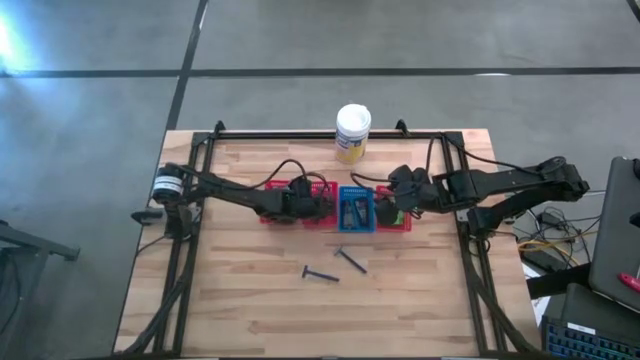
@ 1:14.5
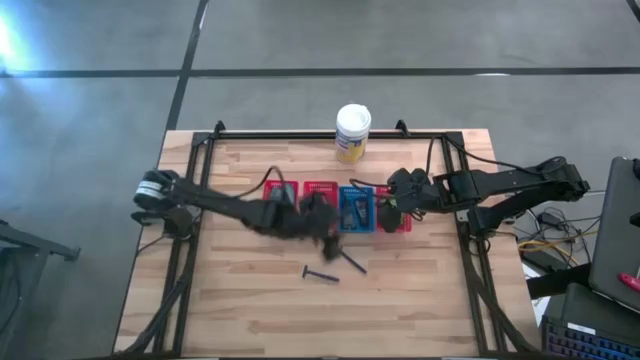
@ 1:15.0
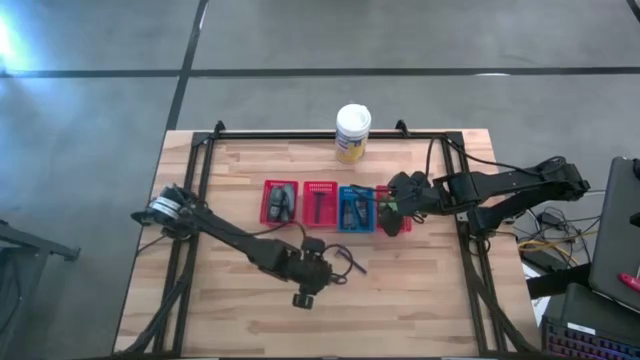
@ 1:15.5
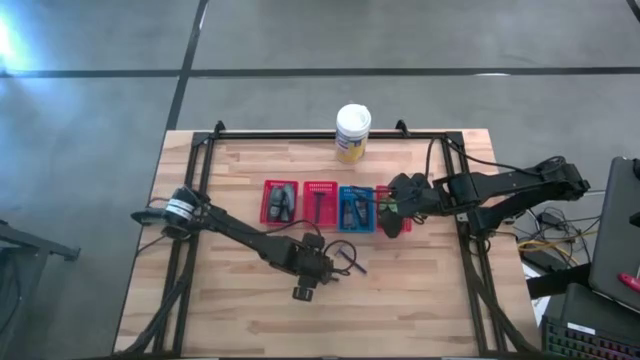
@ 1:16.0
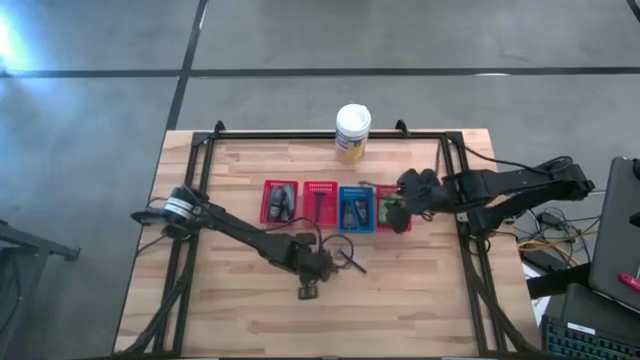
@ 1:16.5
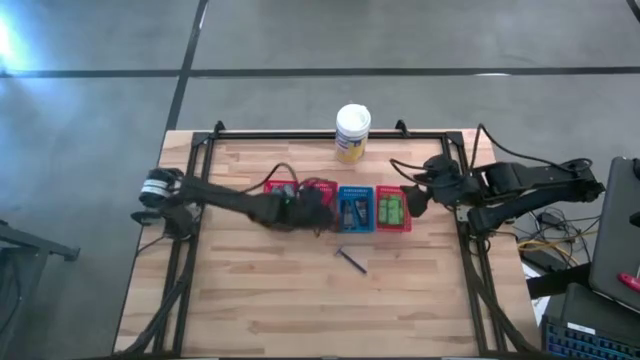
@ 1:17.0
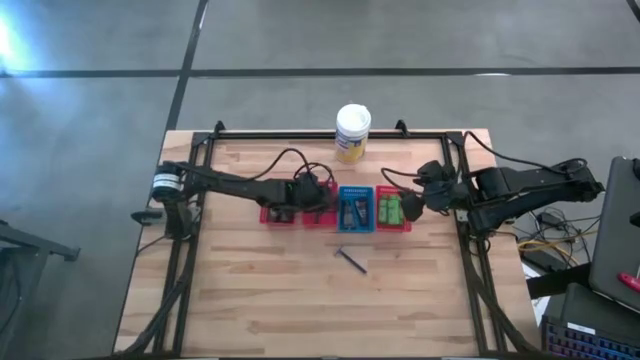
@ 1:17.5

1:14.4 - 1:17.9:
Task: Pick & Place Travel size toiletries
Put the blue razor into the middle left red bin

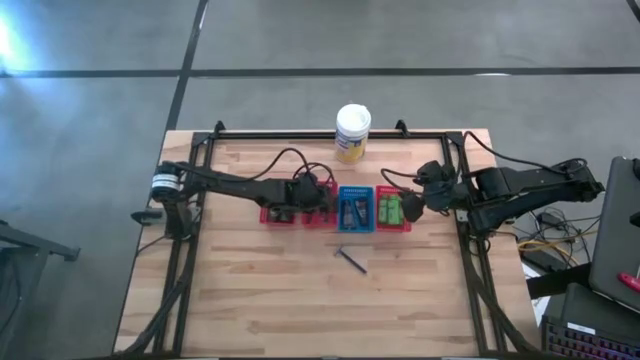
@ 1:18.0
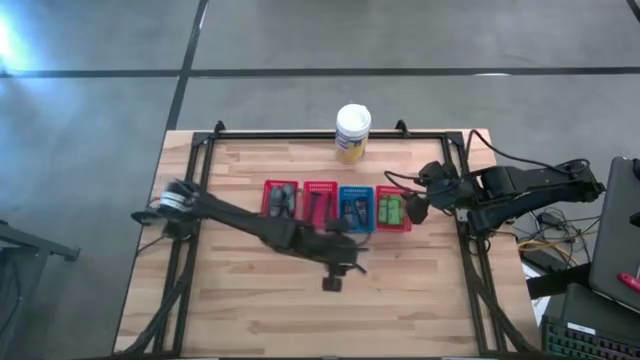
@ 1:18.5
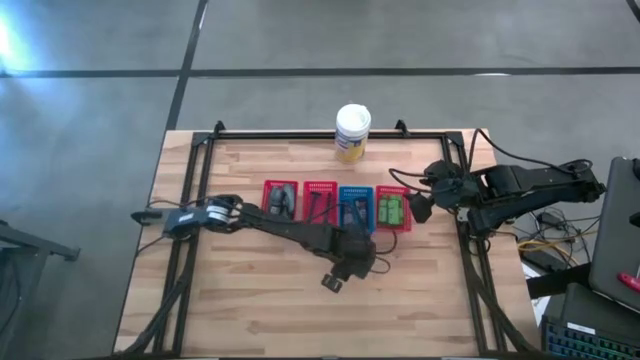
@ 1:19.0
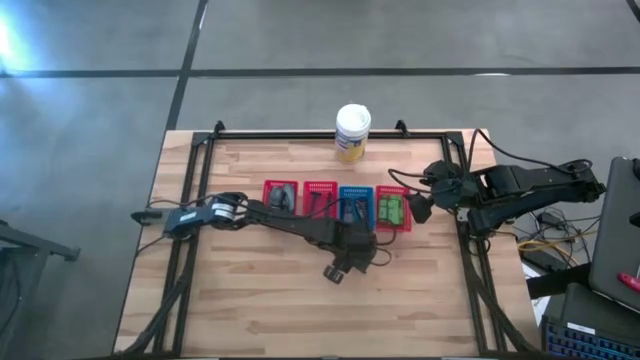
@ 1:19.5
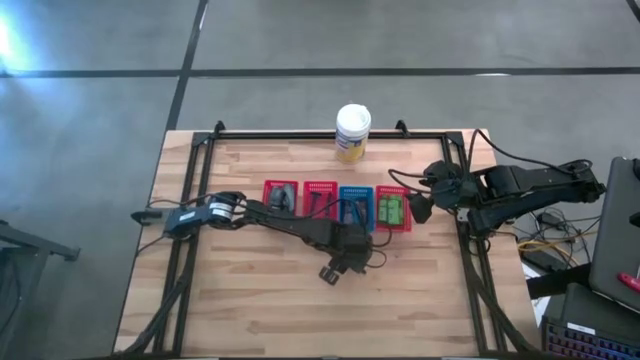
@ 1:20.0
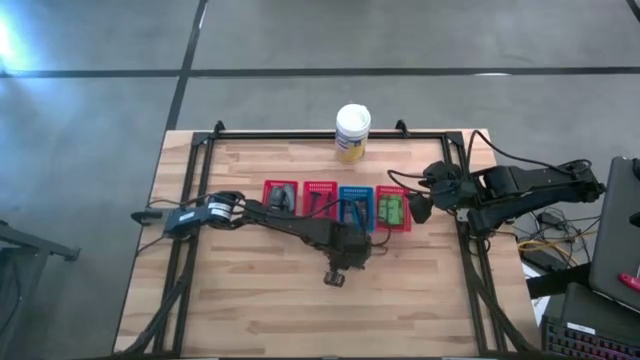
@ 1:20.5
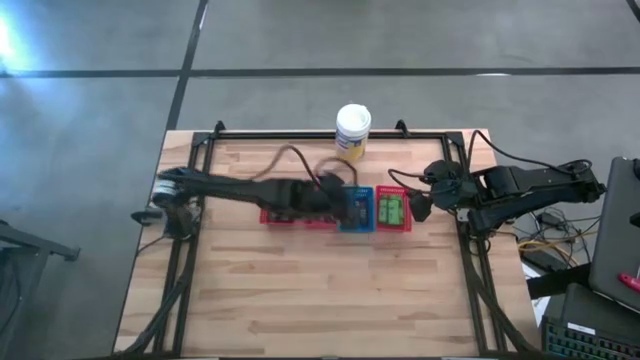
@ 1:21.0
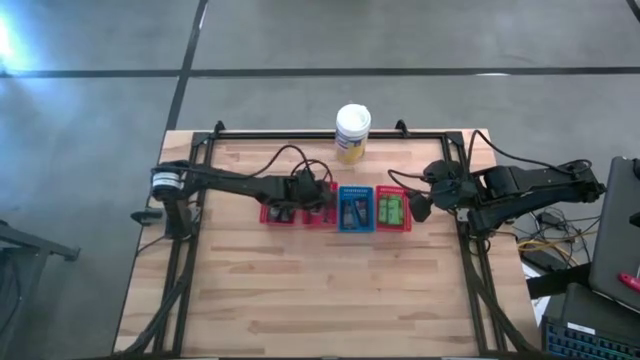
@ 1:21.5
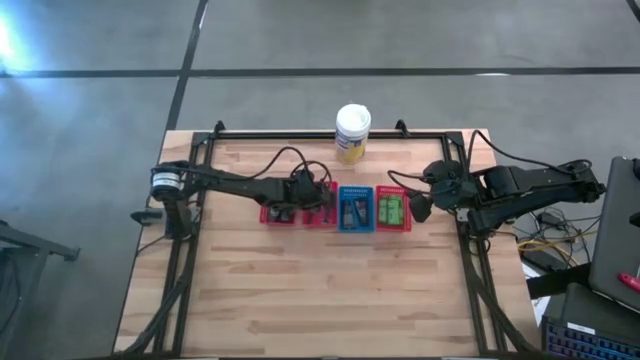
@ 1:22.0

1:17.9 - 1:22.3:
Put the blue razor into the middle left red bin

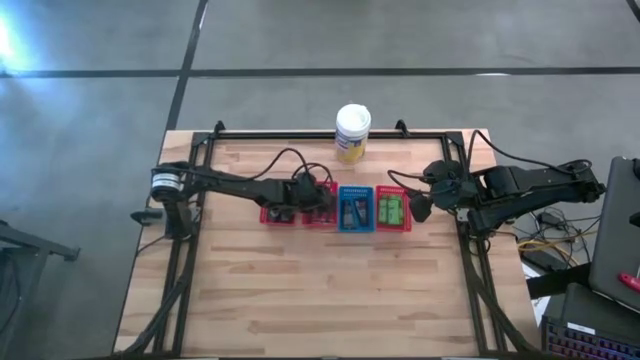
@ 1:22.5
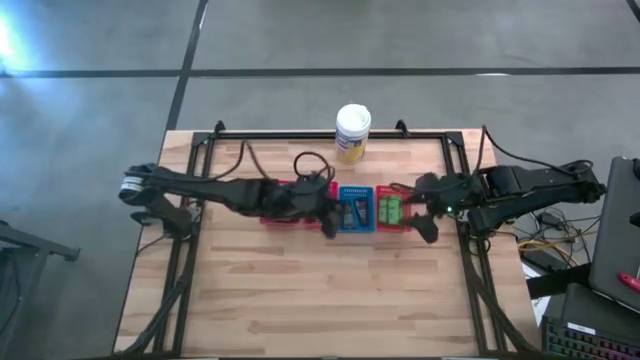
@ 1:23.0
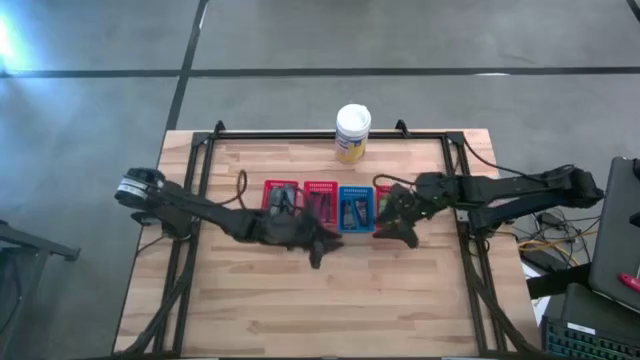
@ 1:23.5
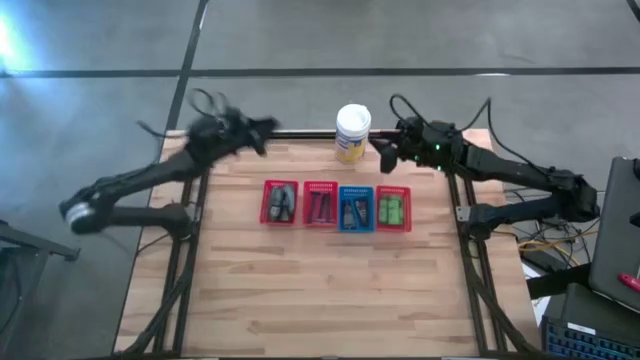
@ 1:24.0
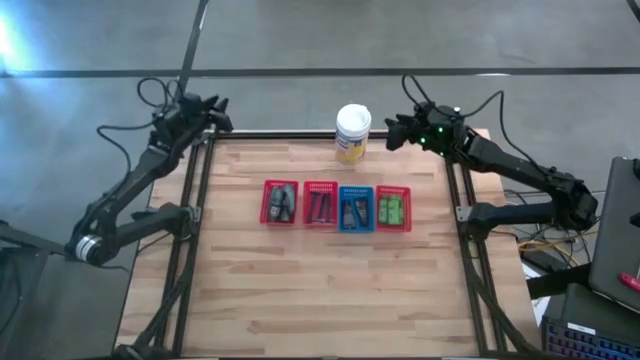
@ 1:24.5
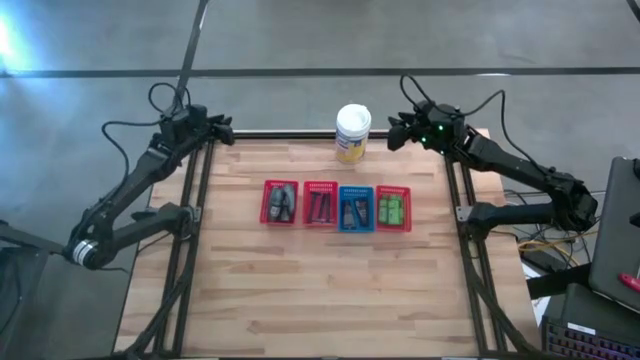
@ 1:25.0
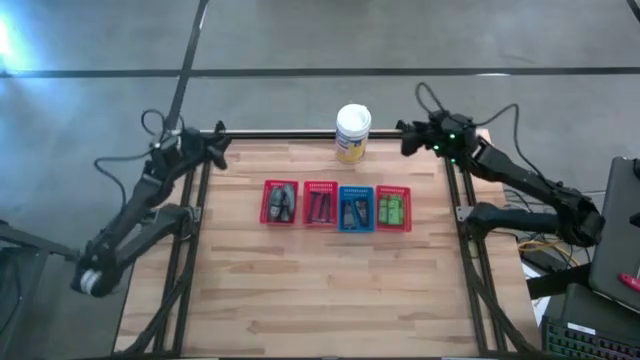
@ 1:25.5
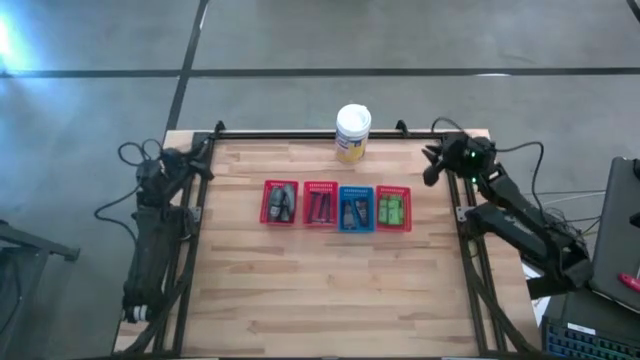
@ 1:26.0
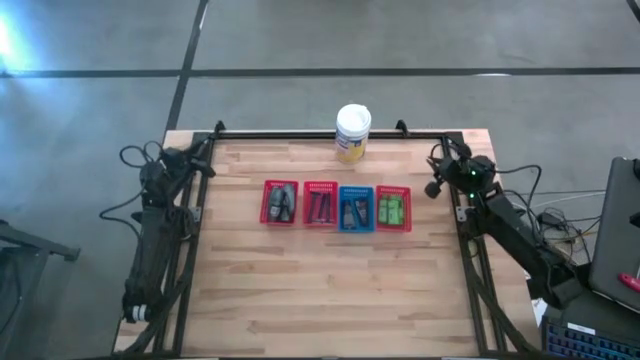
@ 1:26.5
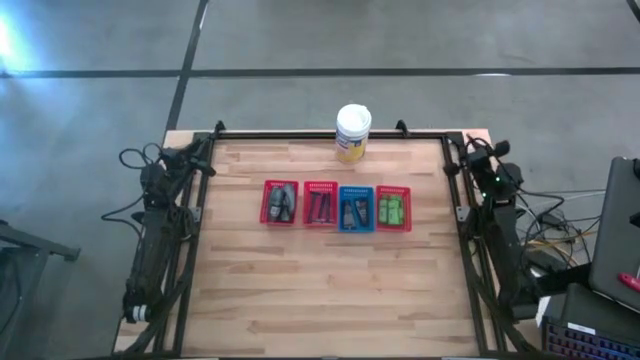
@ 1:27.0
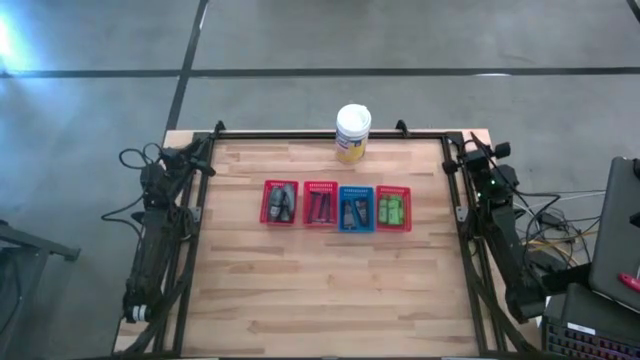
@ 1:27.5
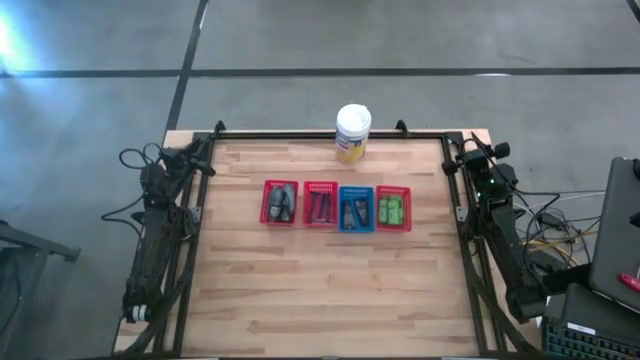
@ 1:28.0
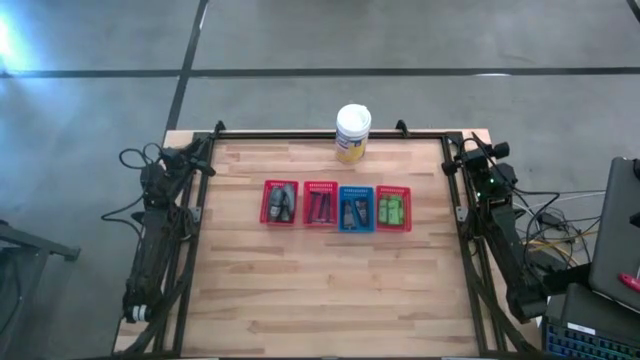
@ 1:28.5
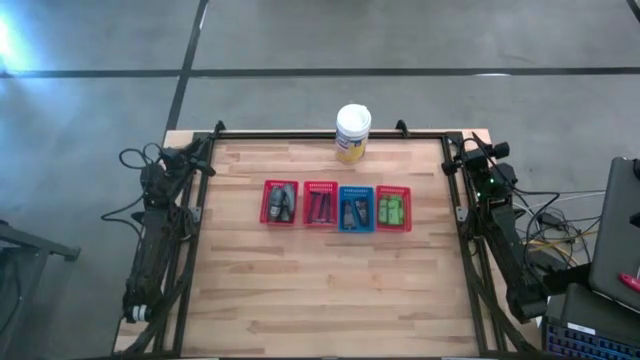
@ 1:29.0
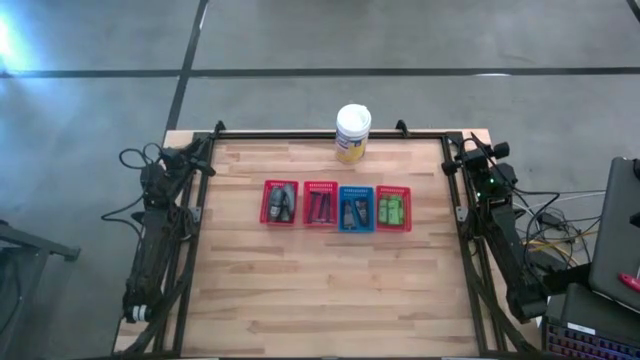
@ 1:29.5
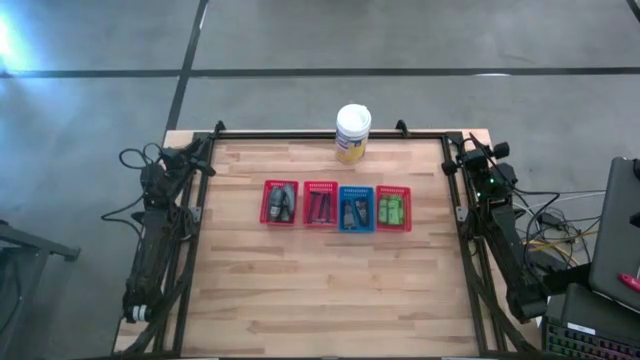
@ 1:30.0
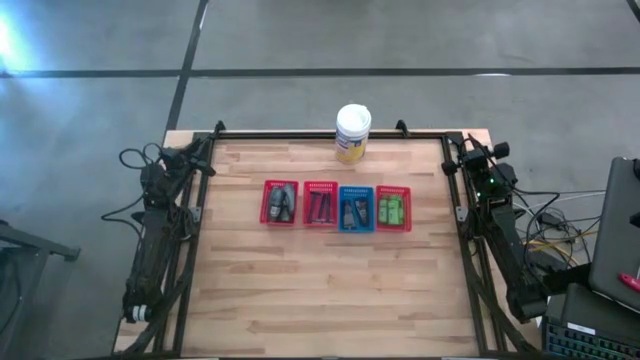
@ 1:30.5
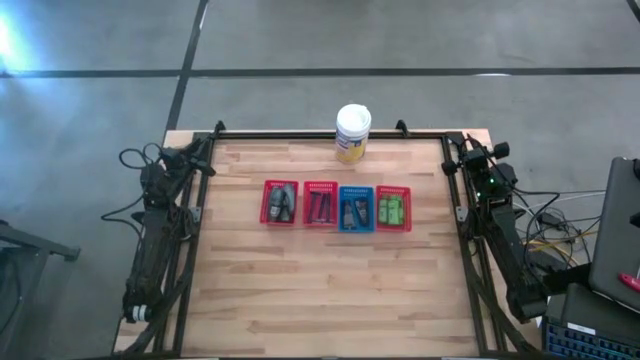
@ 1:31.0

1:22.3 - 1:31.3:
Return to Home Position

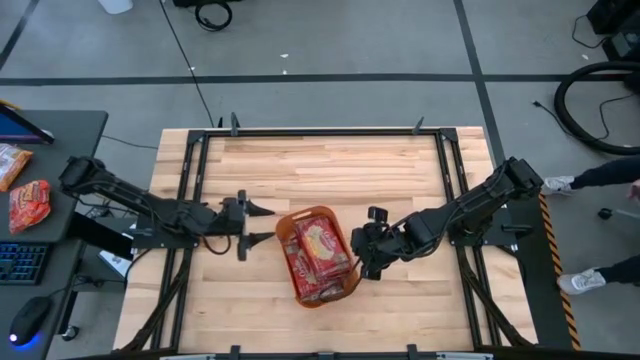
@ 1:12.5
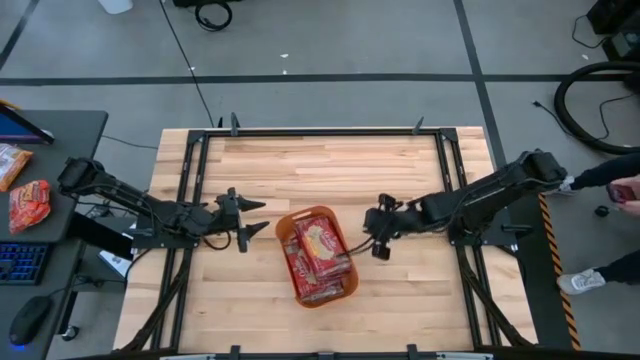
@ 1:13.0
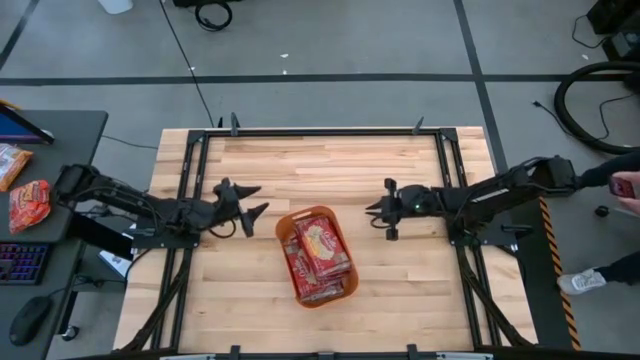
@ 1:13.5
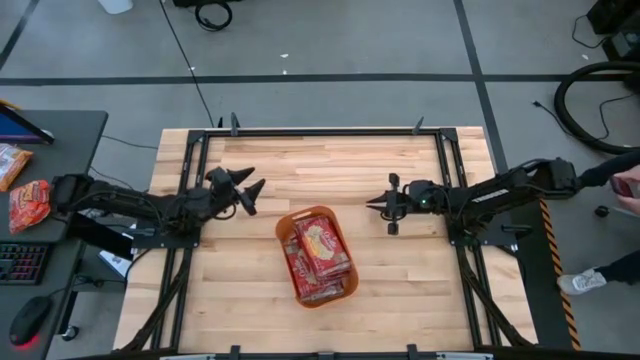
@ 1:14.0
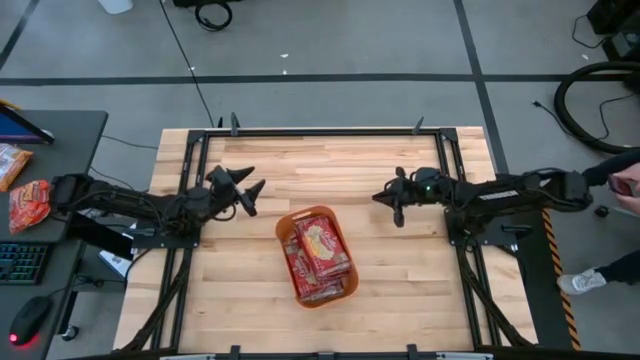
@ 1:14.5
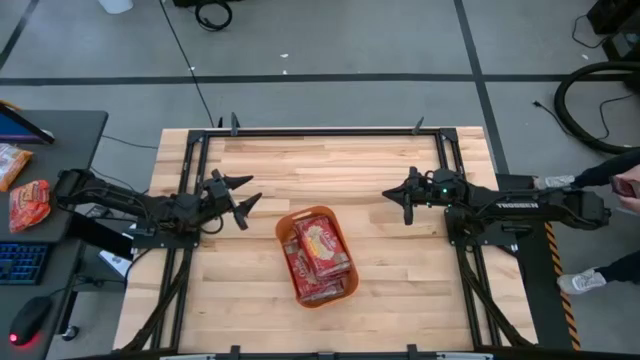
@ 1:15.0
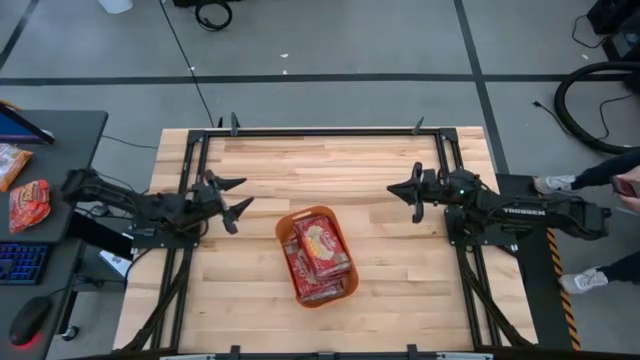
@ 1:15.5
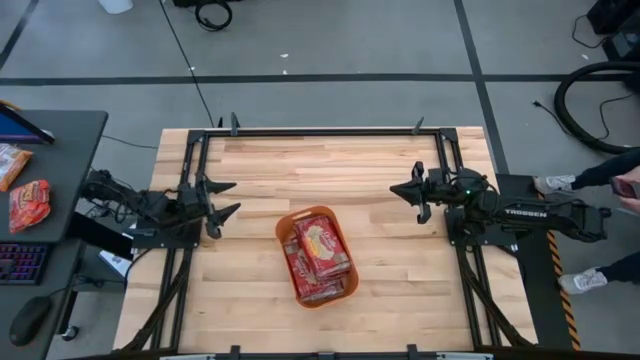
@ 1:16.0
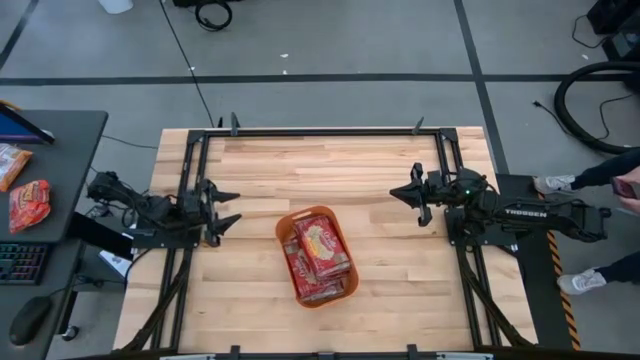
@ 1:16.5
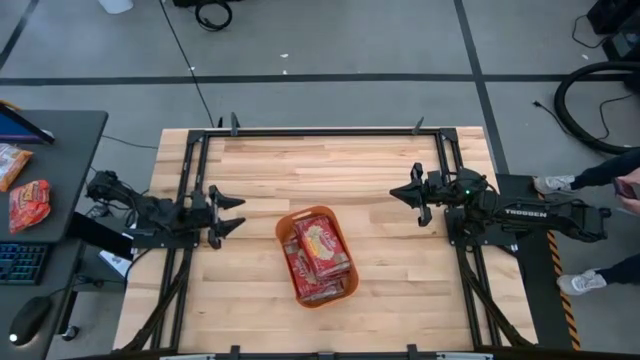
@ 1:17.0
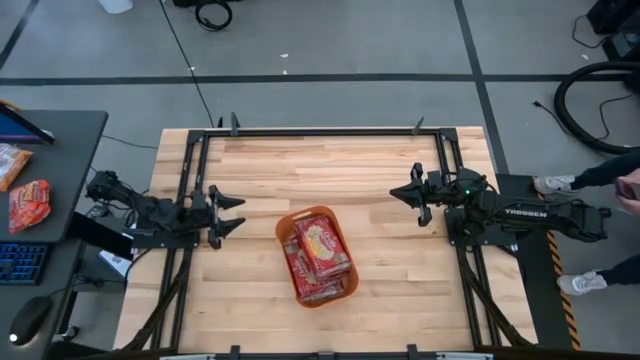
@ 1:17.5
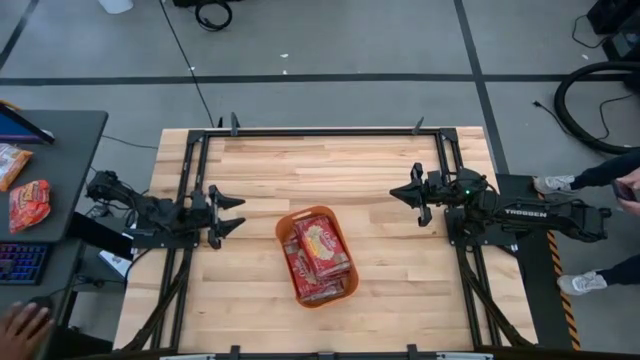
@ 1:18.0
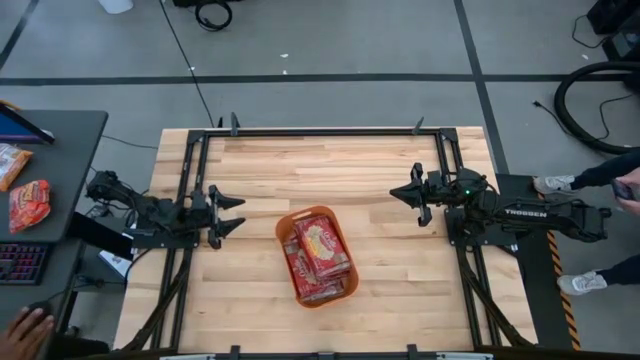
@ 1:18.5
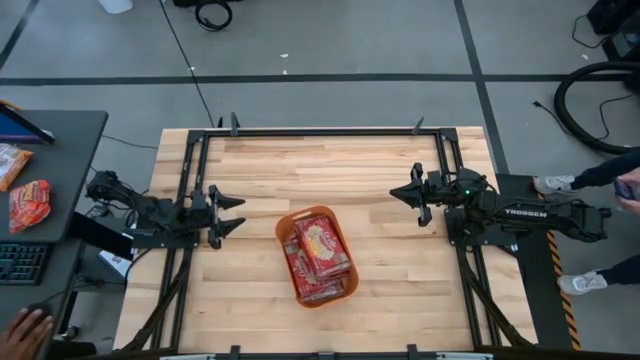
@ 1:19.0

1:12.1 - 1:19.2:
Task: Sort popcorn bags into baskets
Return to Home Position
